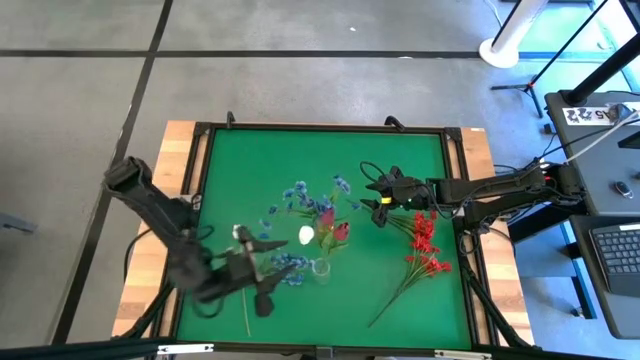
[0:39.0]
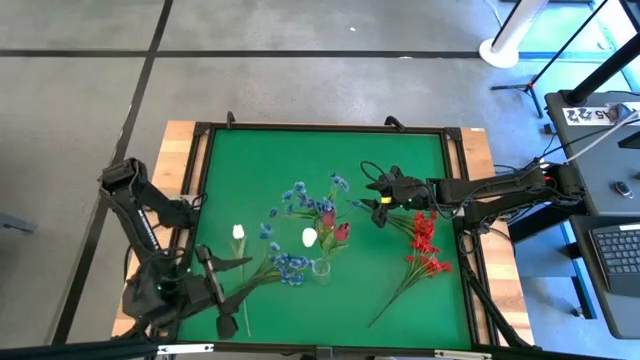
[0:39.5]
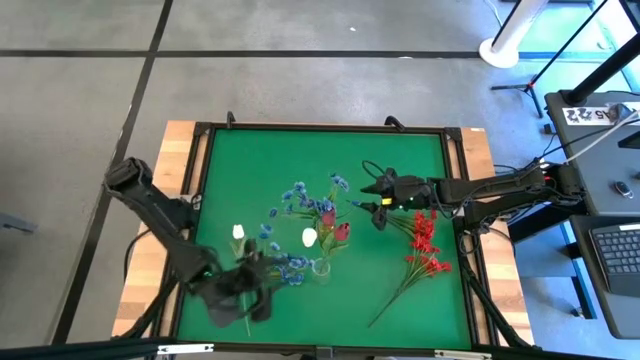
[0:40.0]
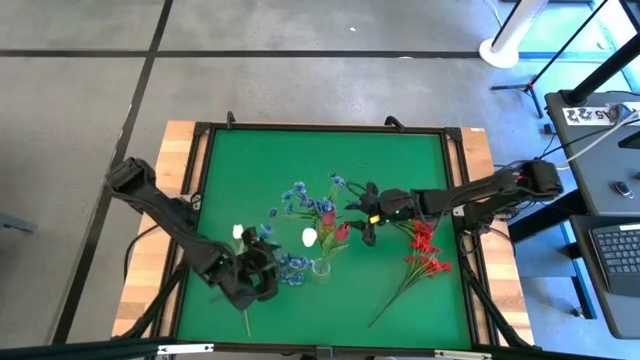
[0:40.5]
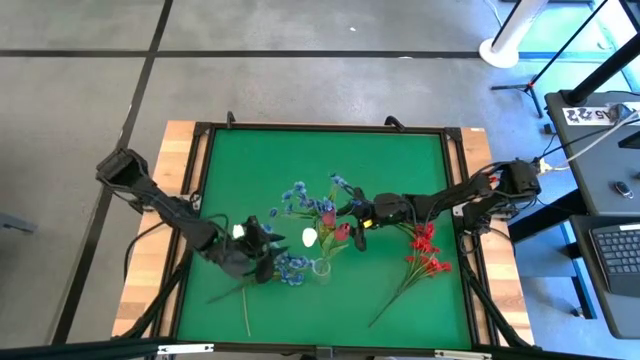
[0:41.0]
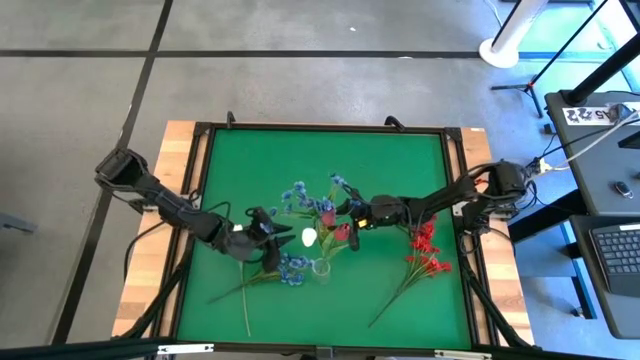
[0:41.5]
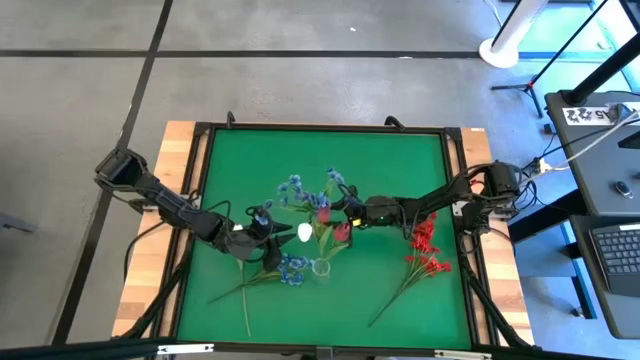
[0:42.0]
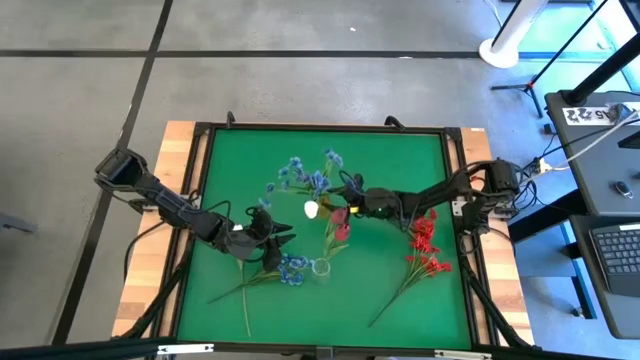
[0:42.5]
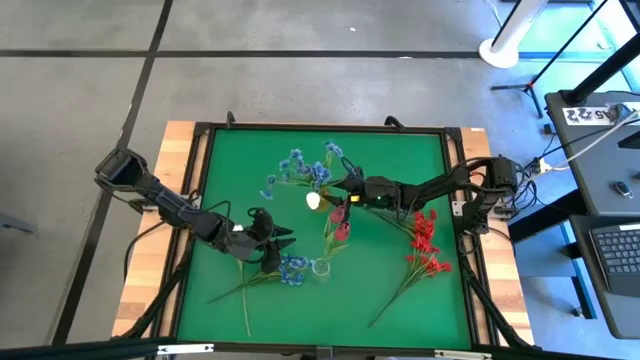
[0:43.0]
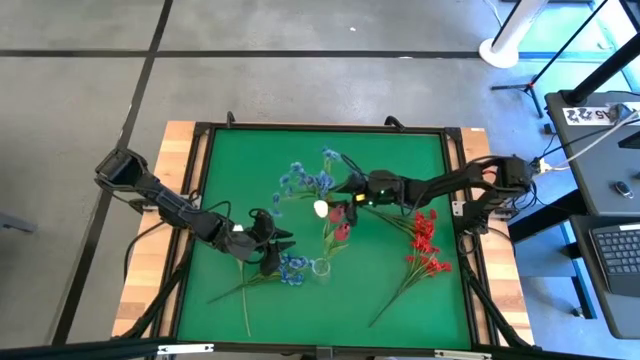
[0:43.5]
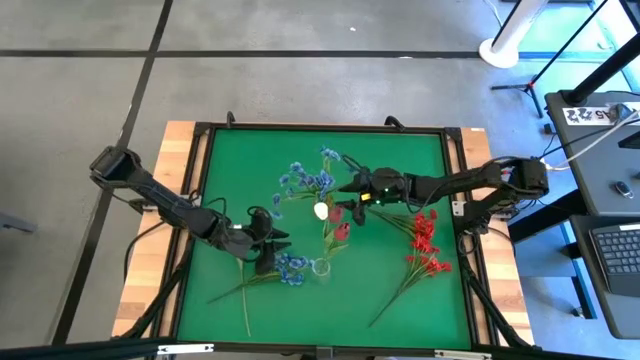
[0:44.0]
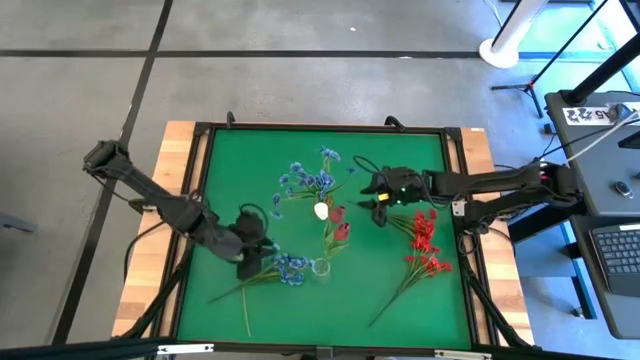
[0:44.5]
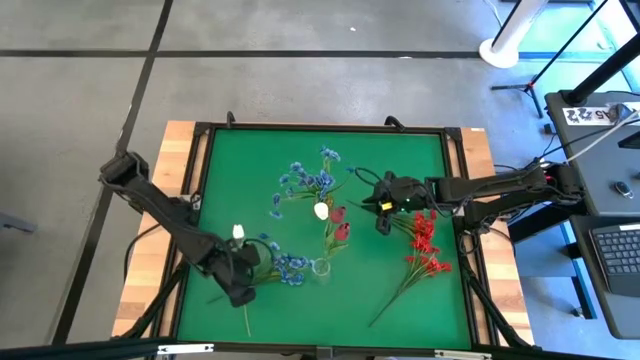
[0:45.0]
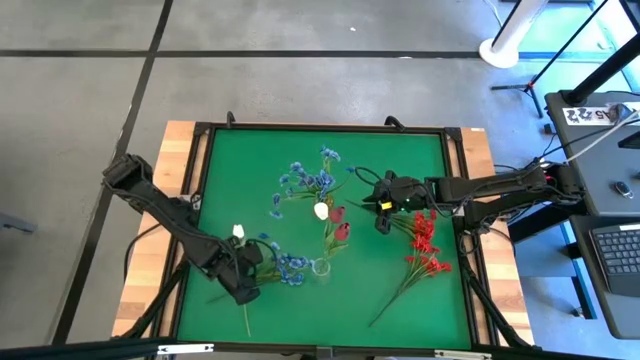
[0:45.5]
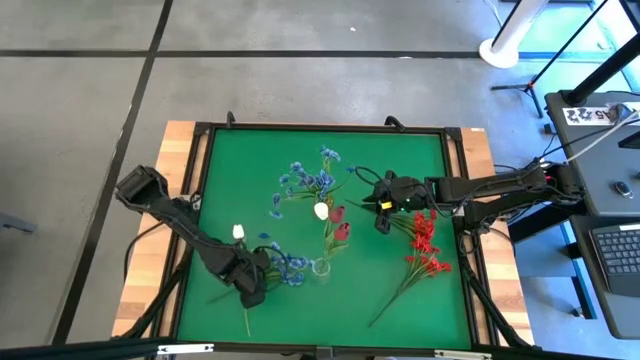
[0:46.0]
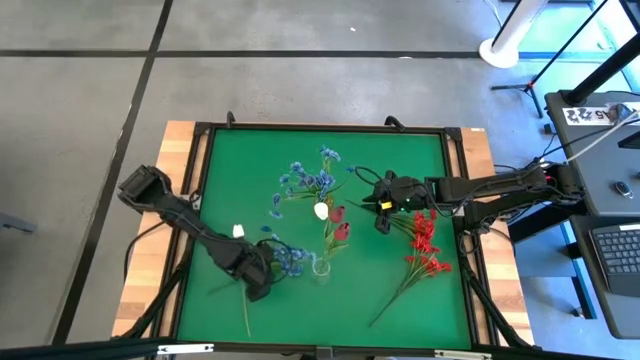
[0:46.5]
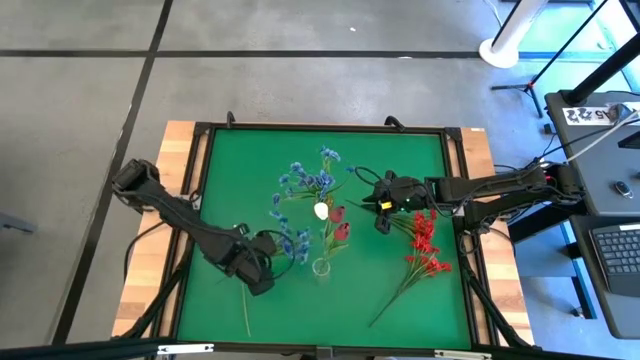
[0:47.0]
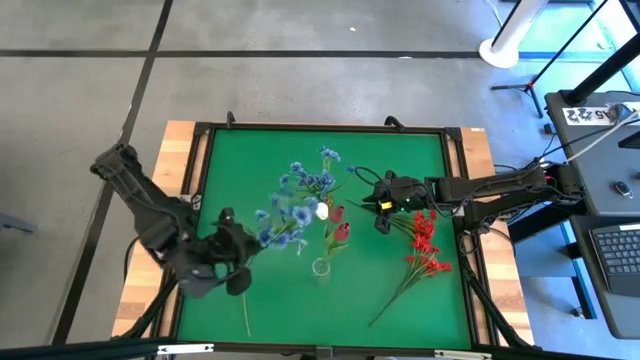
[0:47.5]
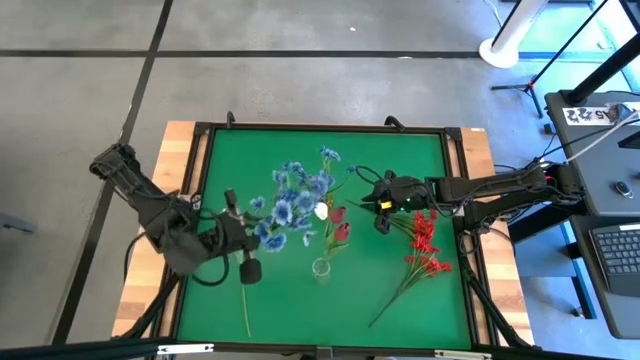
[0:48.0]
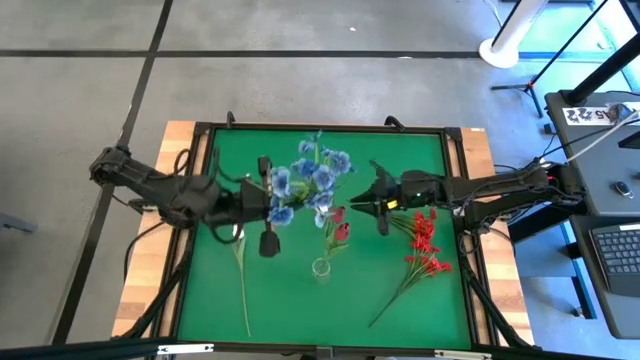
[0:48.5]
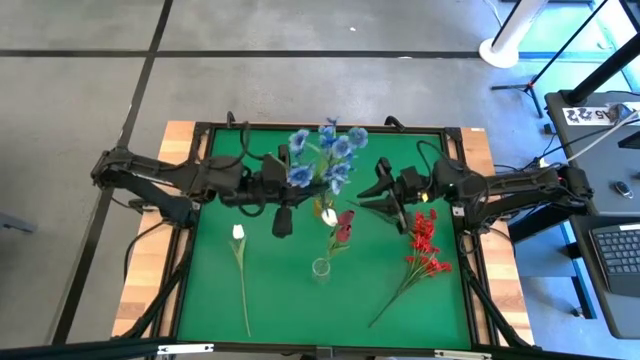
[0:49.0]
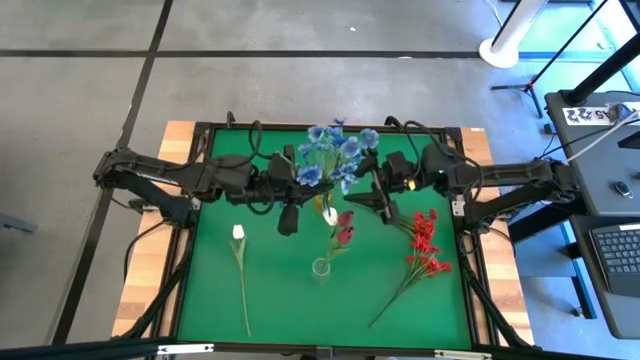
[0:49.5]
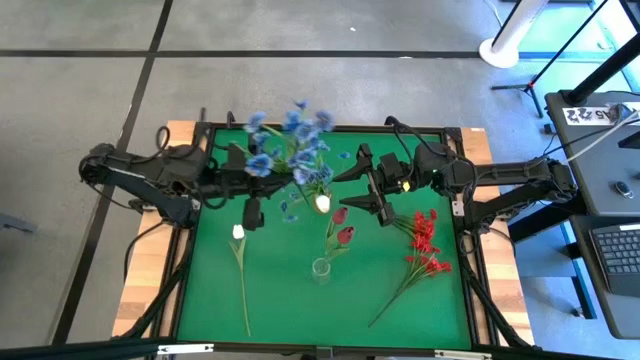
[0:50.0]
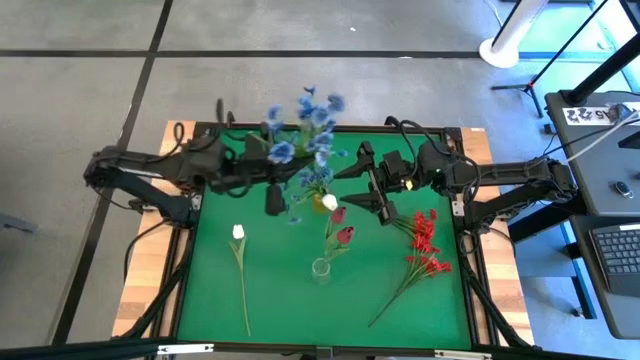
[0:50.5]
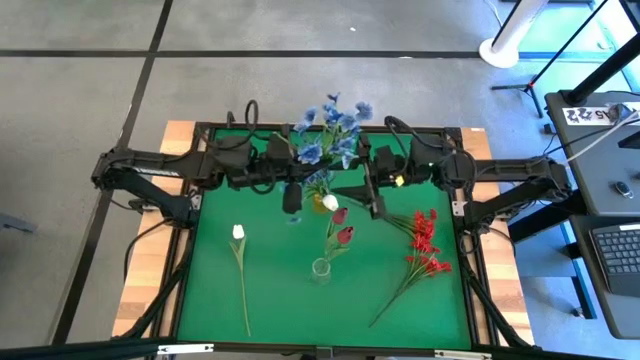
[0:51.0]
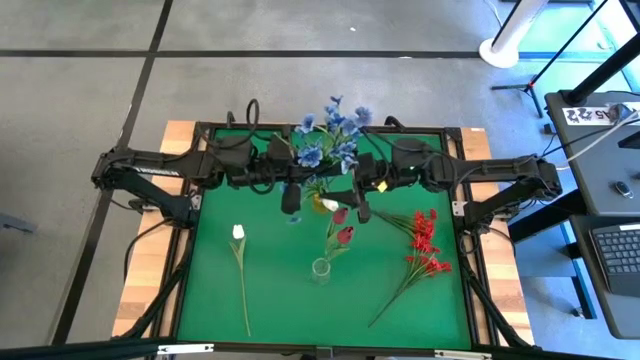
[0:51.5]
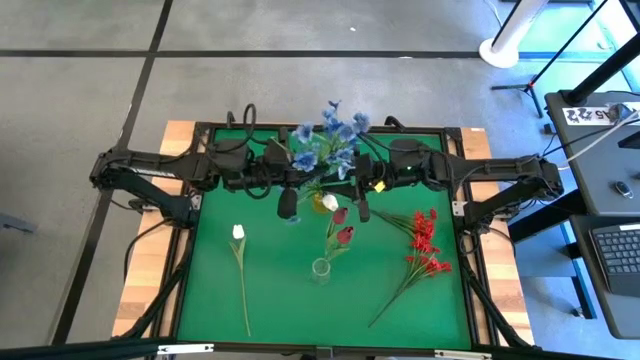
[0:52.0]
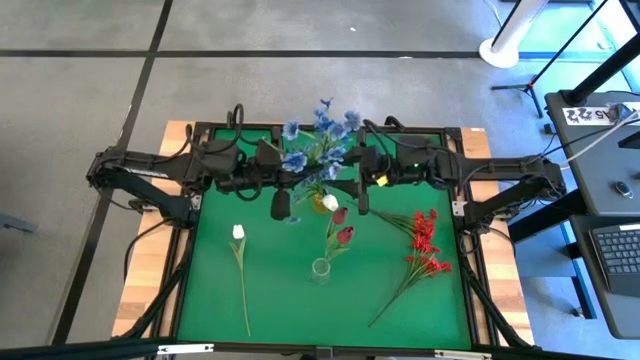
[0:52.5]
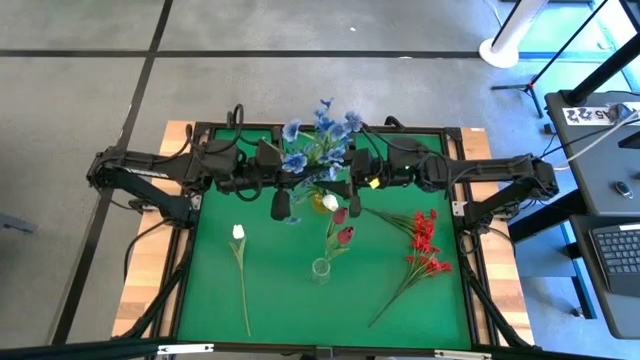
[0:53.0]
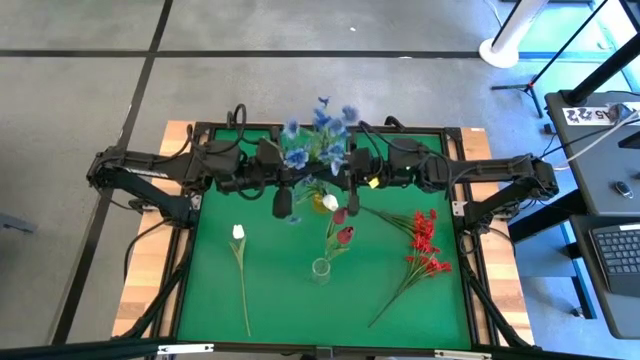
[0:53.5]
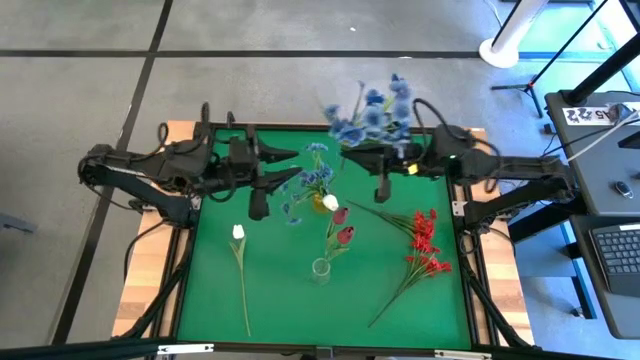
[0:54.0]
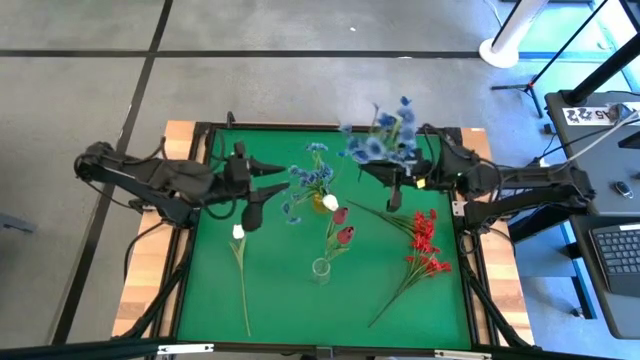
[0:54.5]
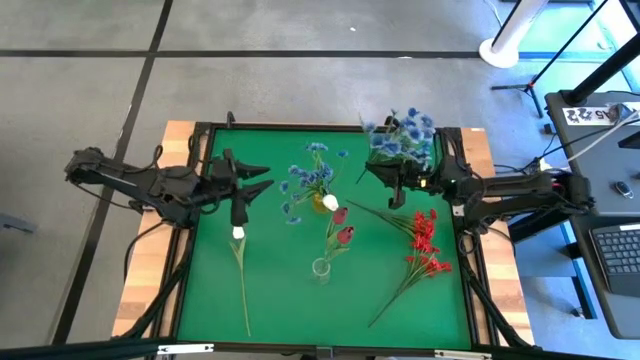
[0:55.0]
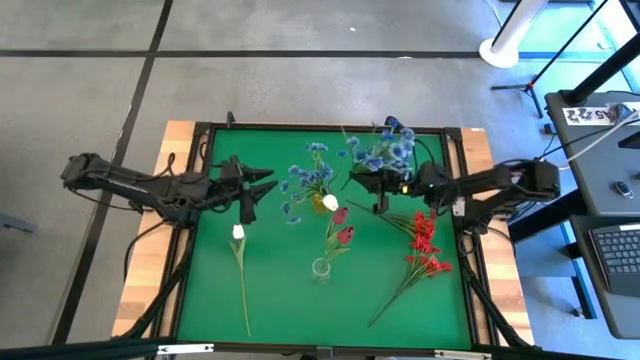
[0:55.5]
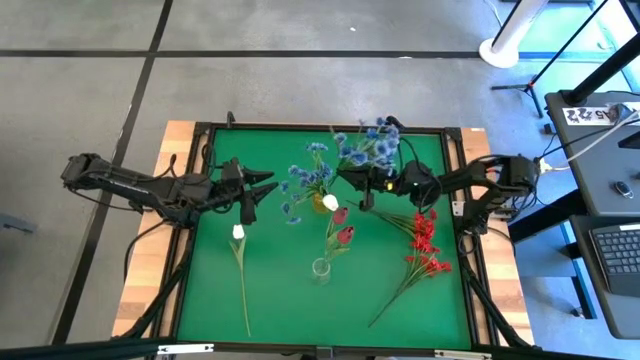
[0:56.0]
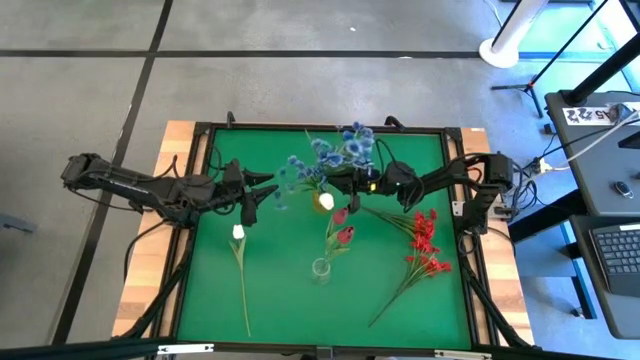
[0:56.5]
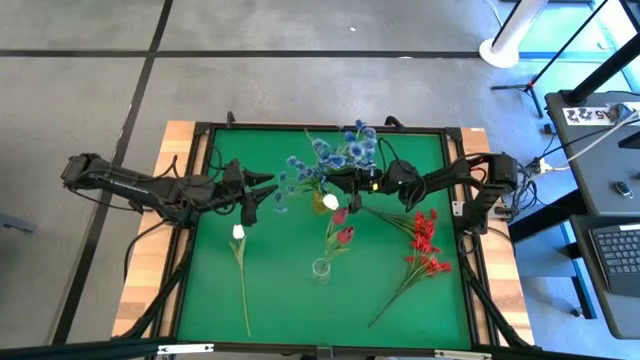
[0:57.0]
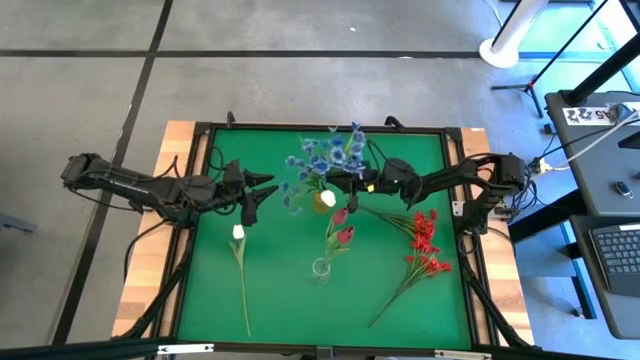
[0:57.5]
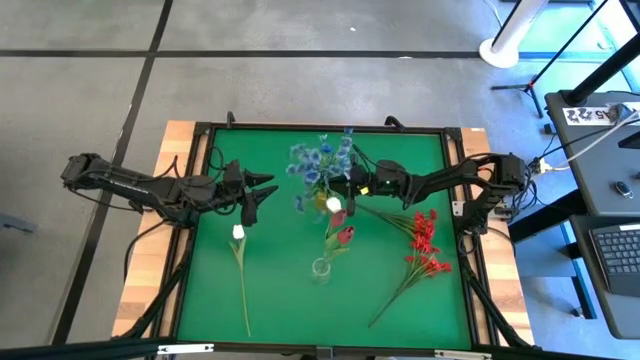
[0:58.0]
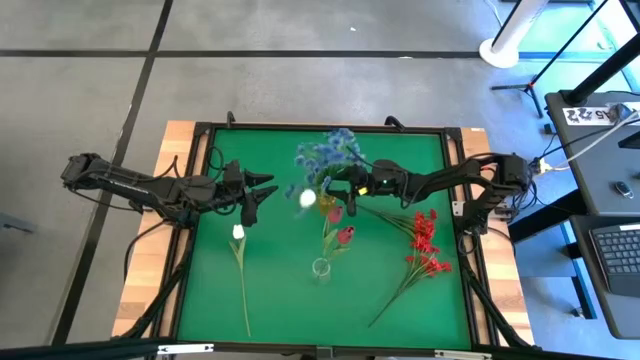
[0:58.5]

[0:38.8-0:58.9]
Task: Sort flowers into vase by color
Put the blue flowers into the yellow flower vase

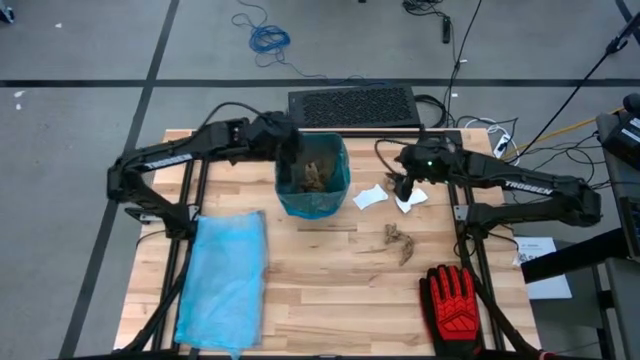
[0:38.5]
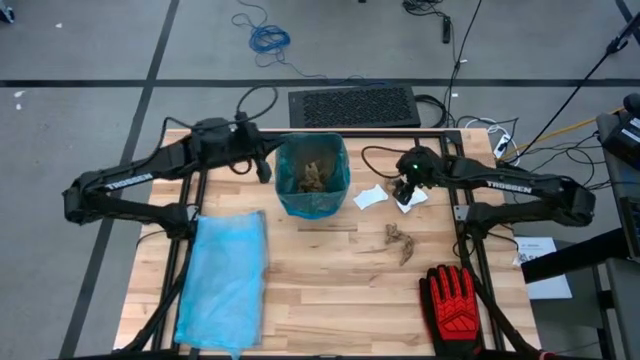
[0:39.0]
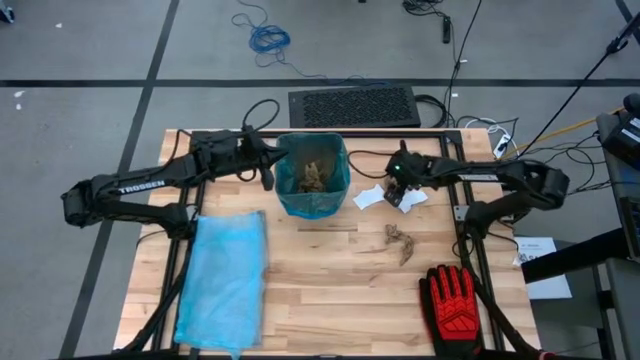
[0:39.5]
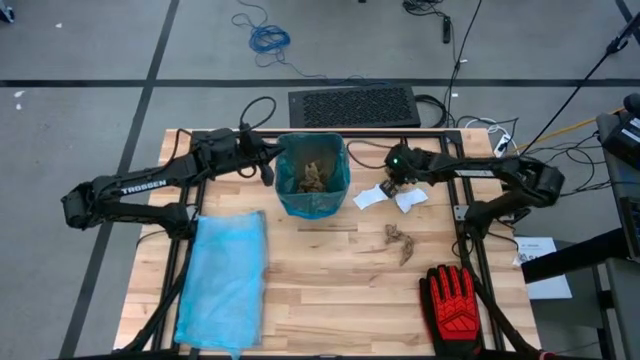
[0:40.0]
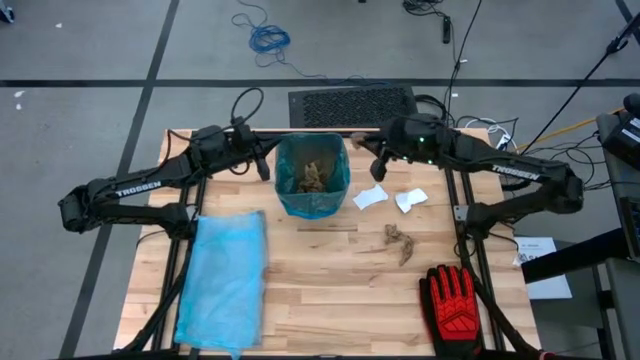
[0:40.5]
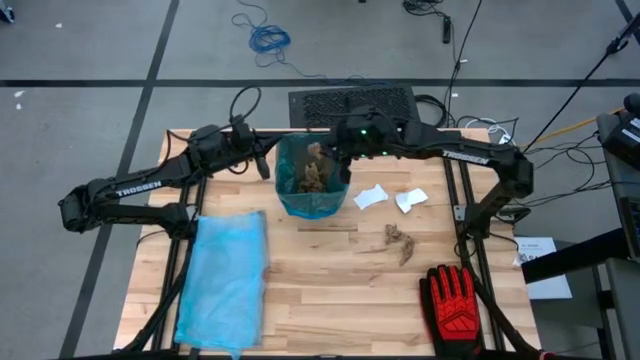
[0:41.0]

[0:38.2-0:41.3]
Task: place trash/remove bag and relplace
Put the brown napkin into the black trash bin
